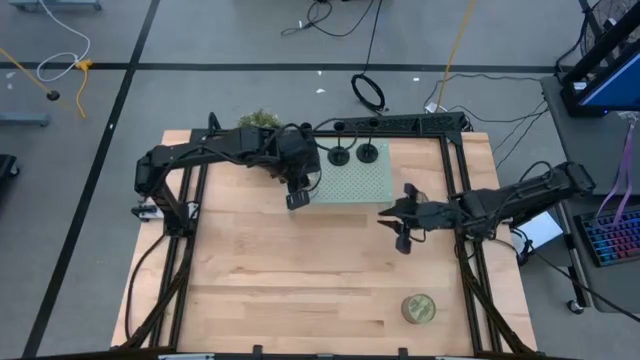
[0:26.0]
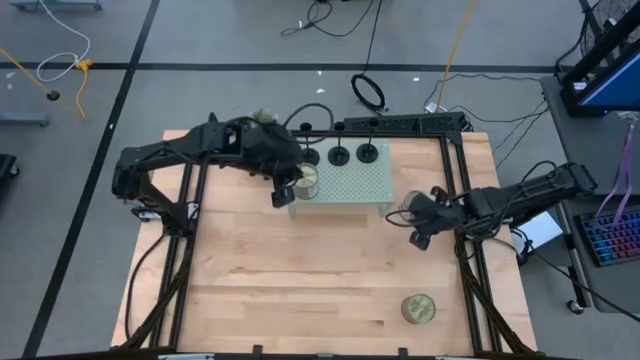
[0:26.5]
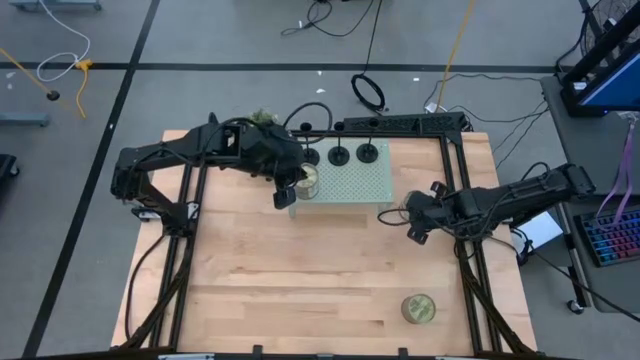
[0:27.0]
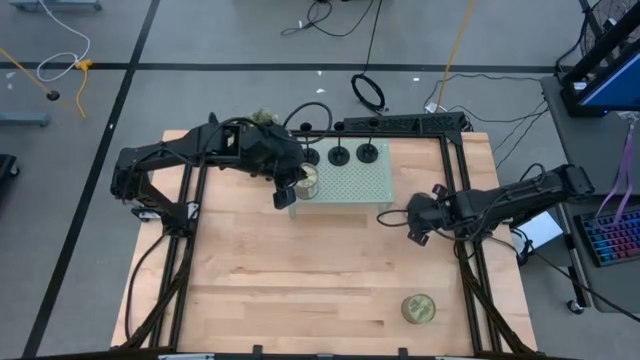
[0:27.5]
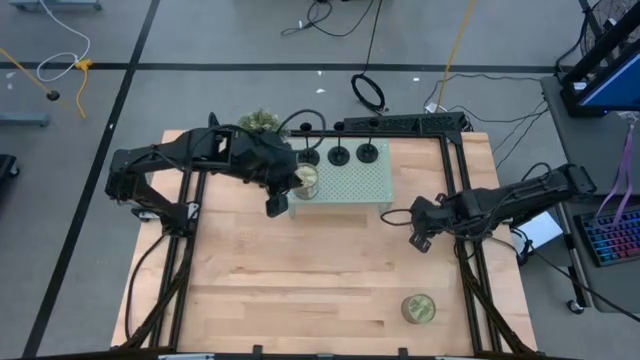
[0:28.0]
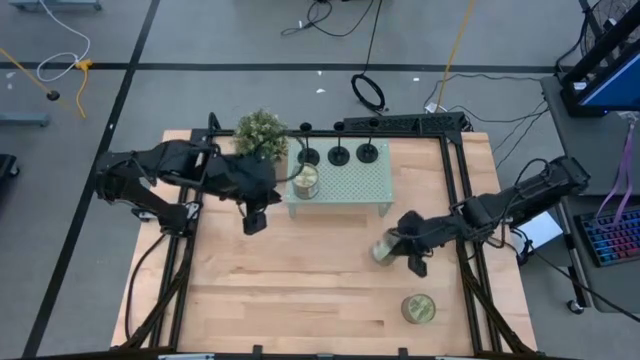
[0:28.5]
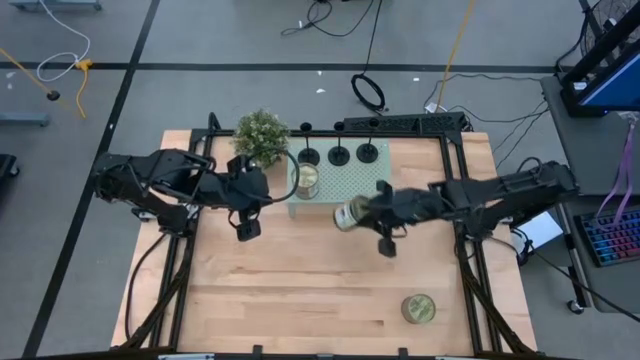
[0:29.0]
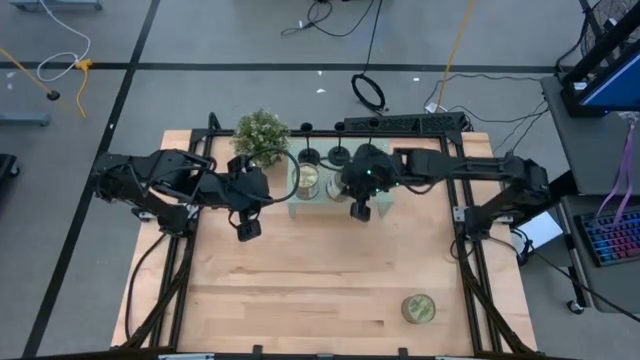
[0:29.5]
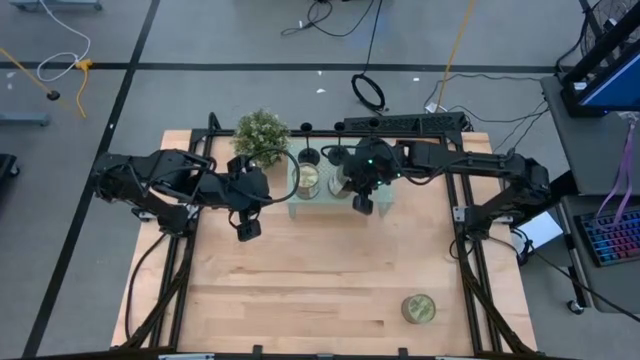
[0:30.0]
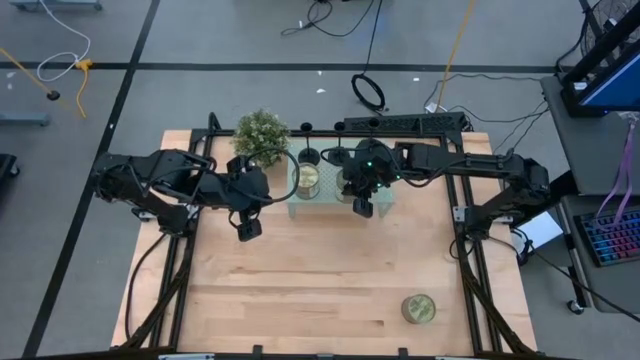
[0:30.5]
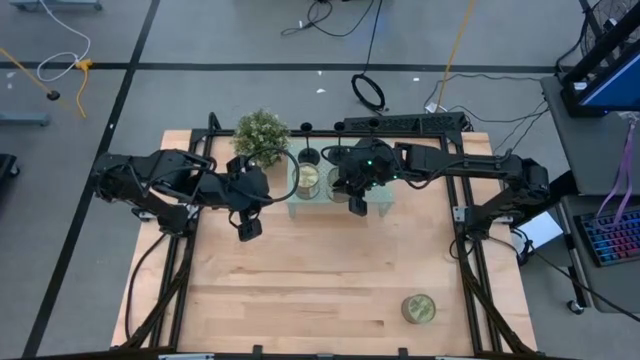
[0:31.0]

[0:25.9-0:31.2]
Task: Pick & Place candle stick holders
Put the top green scented candle on the shelf

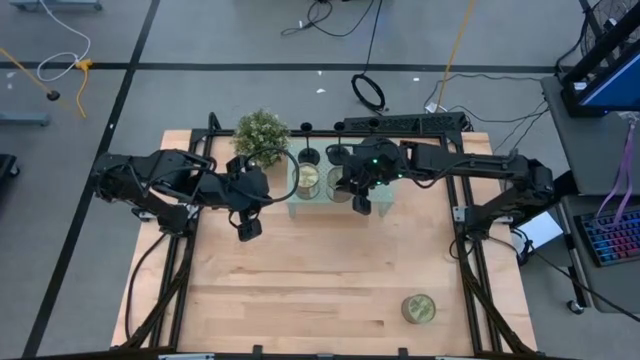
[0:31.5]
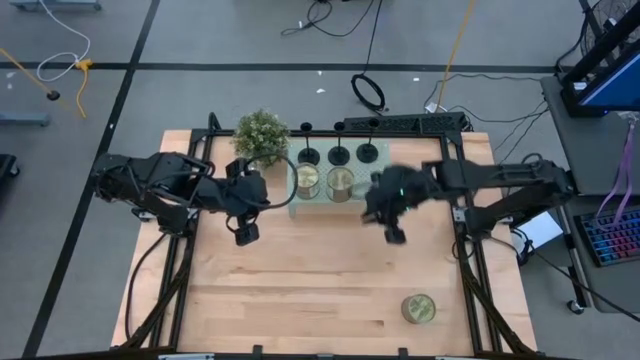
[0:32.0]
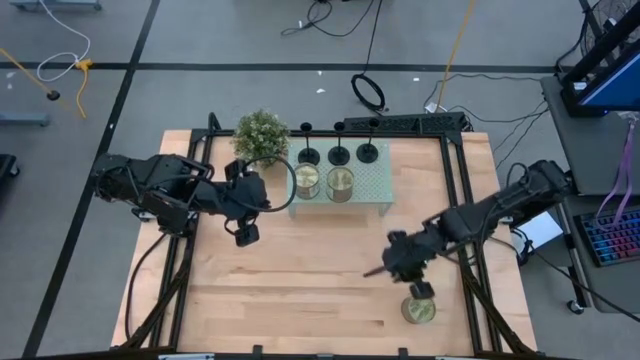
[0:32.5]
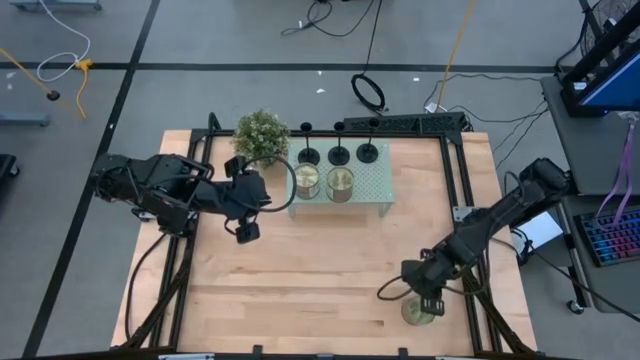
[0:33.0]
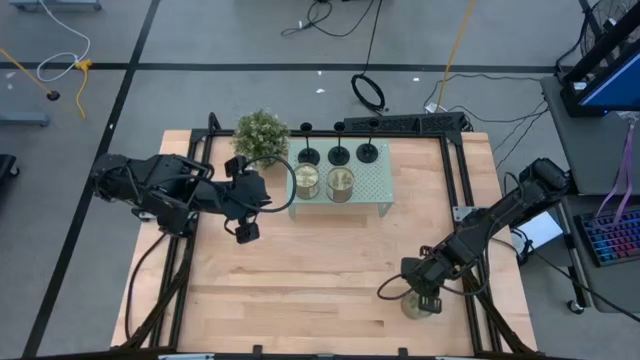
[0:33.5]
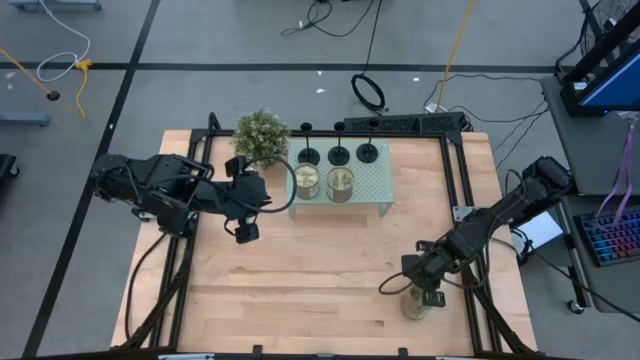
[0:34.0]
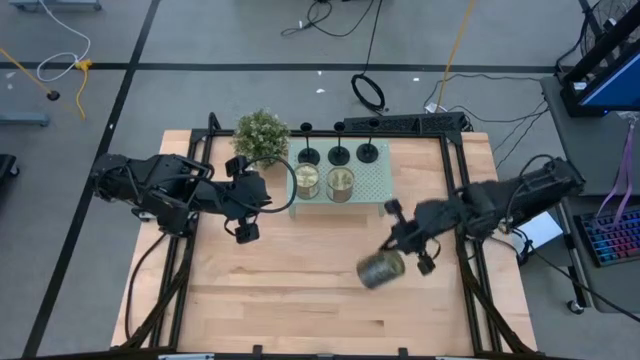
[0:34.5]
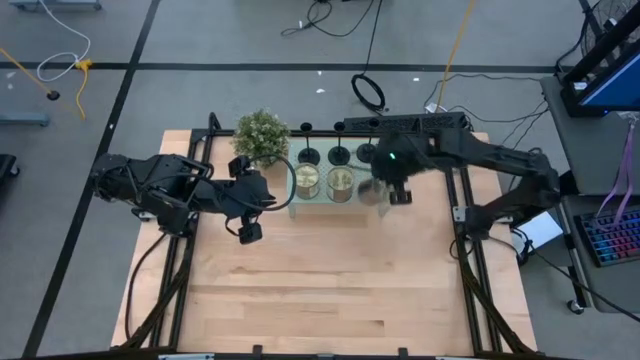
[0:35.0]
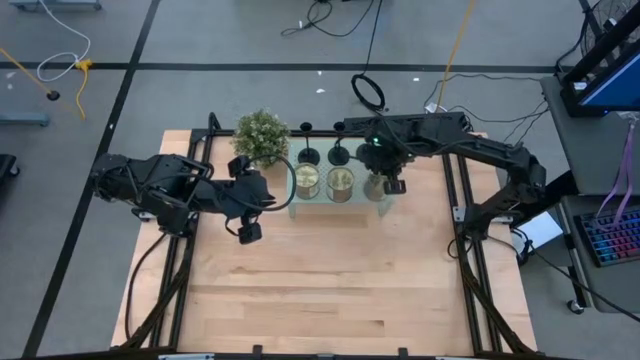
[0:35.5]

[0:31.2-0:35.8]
Put the green scented candle on the shelf

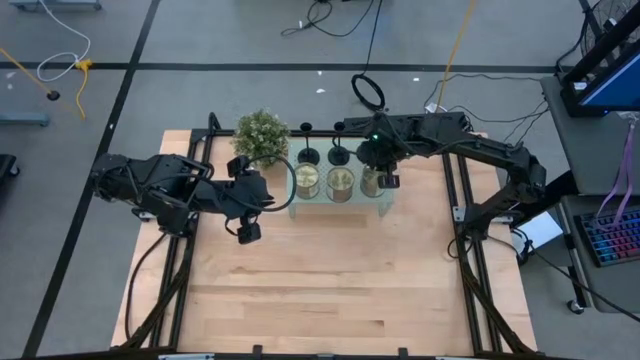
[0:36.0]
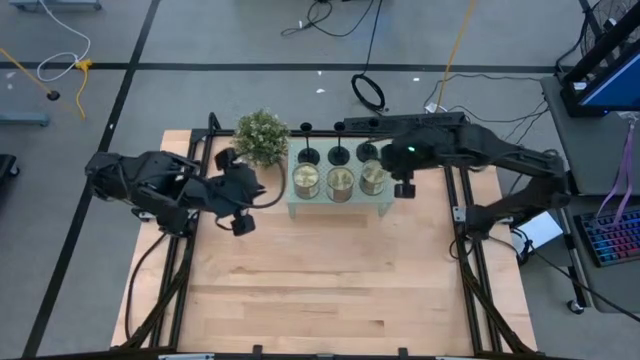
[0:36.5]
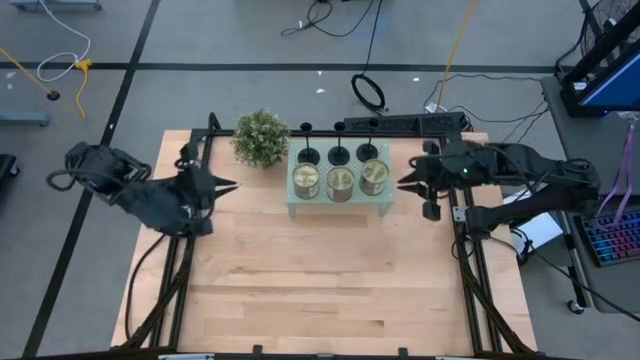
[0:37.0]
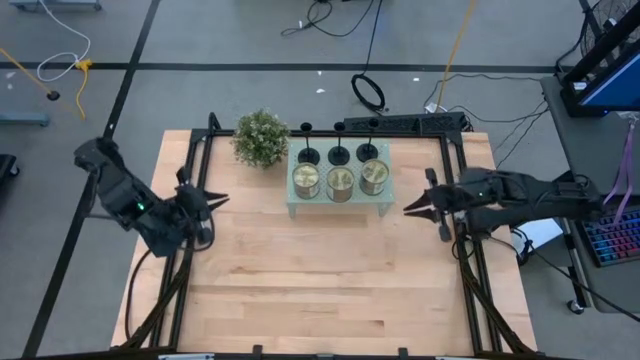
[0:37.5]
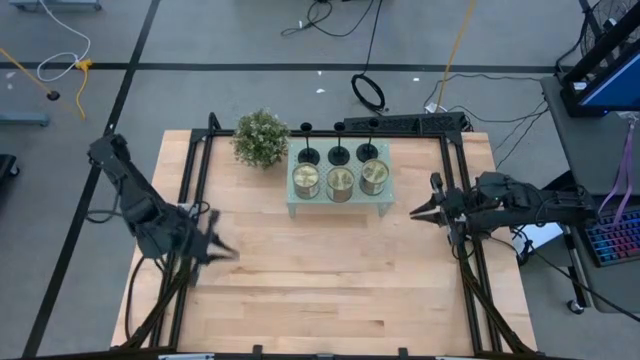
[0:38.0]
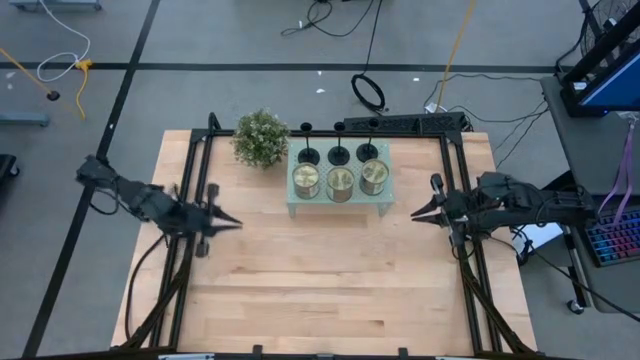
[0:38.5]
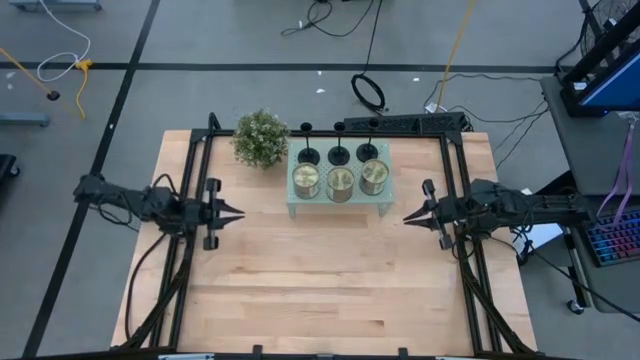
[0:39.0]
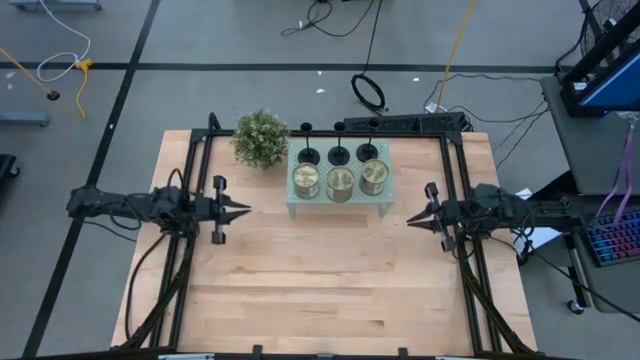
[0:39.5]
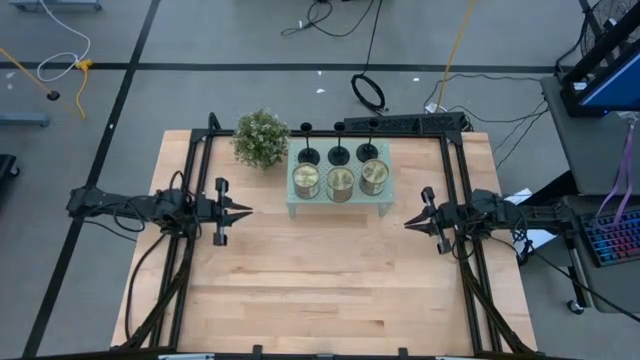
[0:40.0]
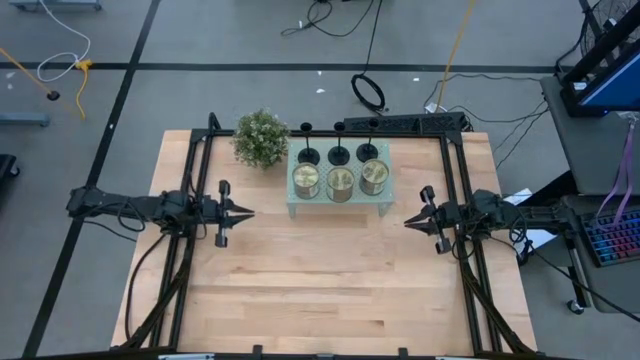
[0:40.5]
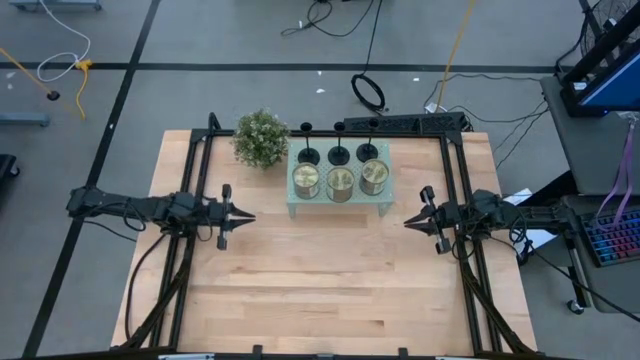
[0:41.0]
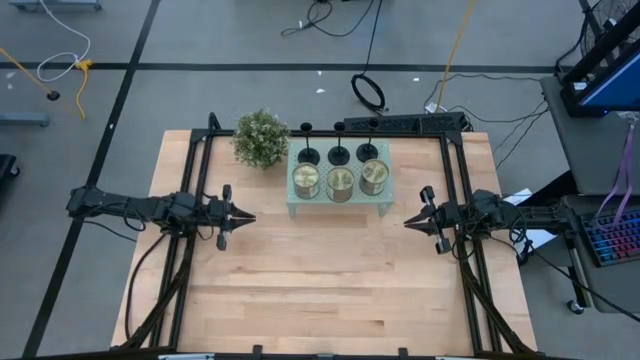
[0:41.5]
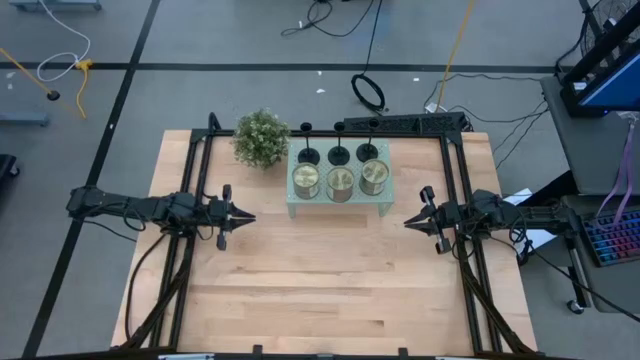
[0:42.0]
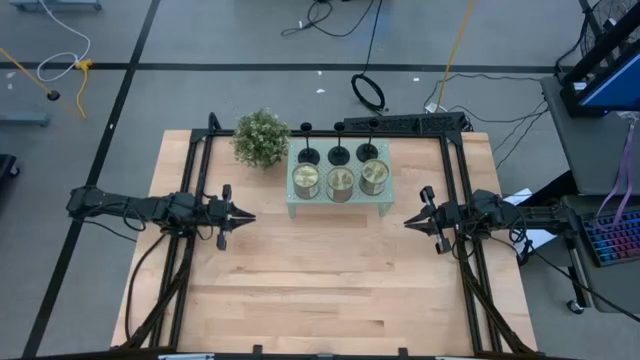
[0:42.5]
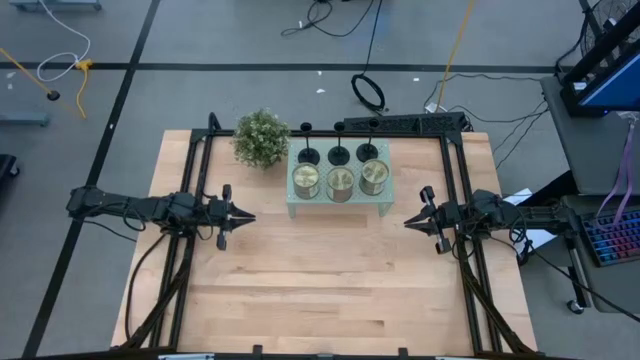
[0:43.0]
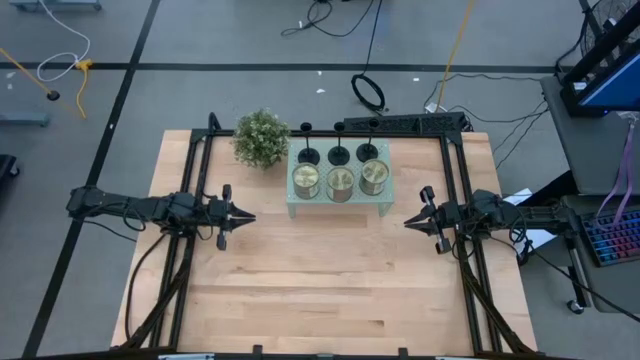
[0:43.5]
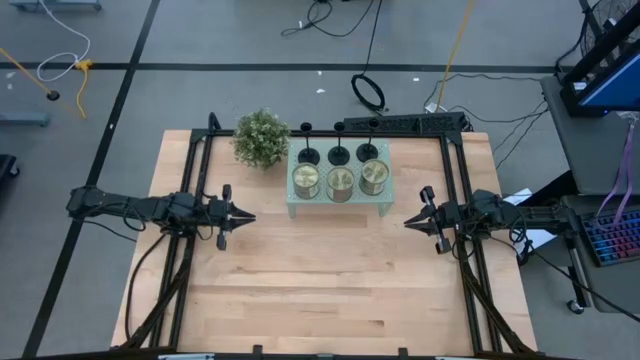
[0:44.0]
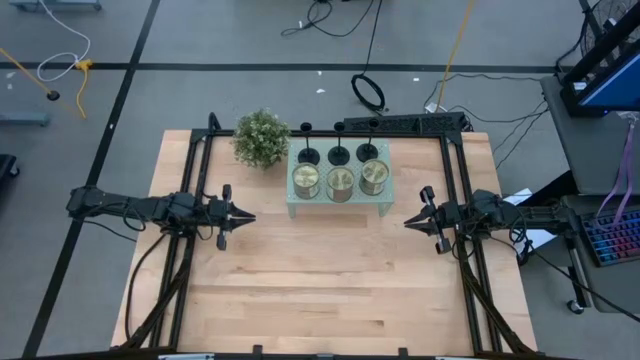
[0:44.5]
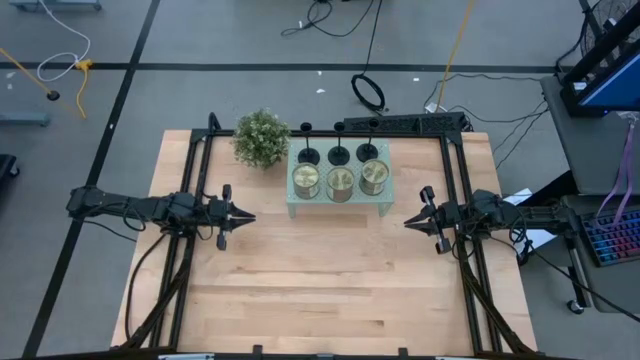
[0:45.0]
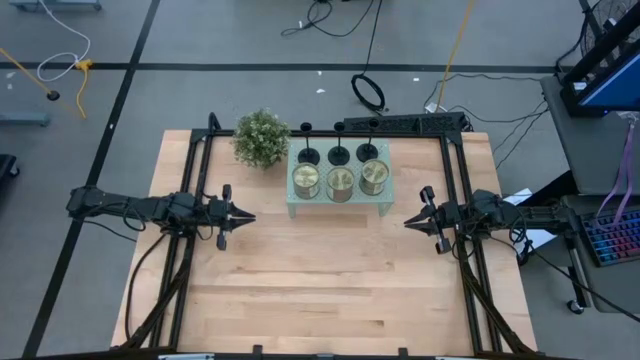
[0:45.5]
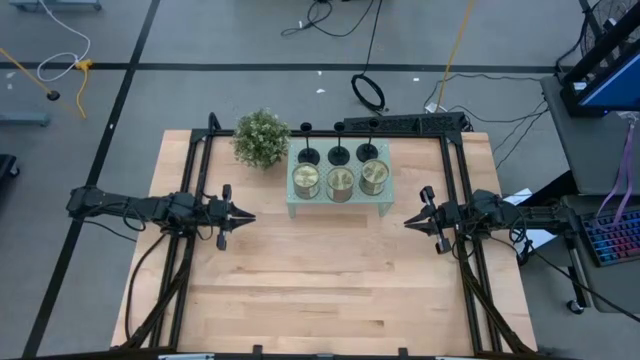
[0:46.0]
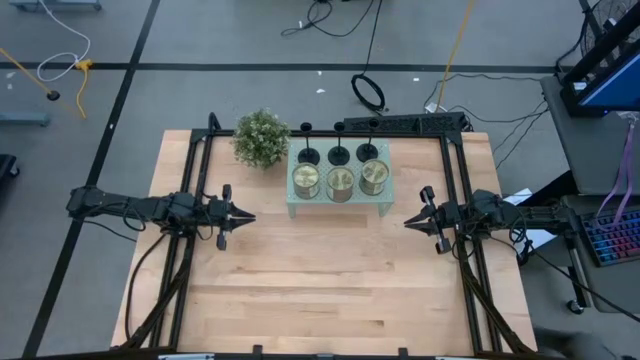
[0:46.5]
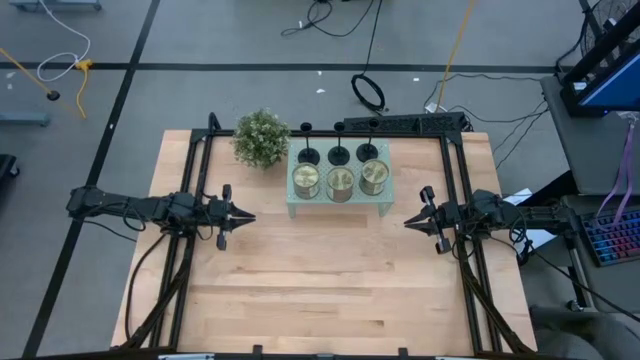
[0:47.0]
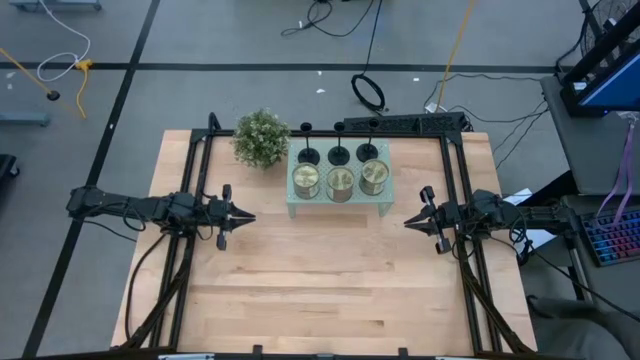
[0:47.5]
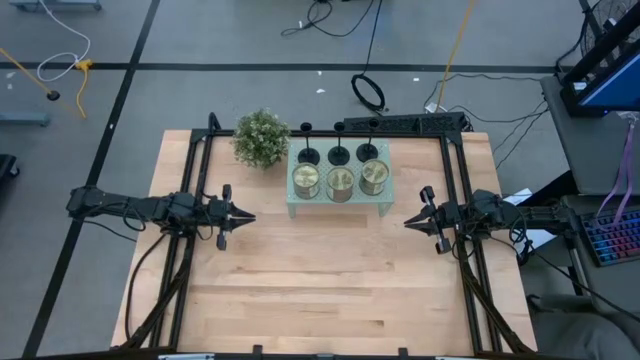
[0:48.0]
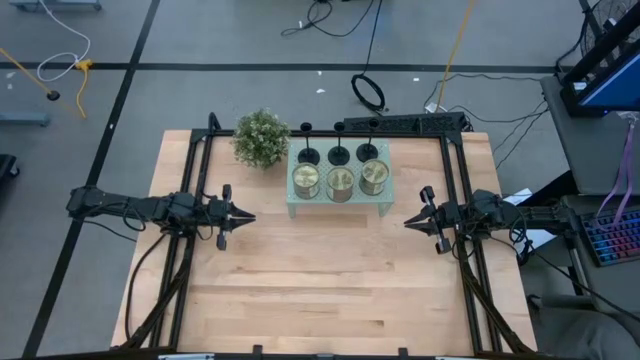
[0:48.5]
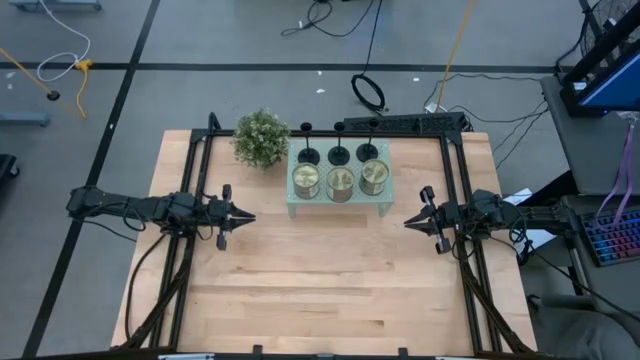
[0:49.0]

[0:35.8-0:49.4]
Return to Home Position
